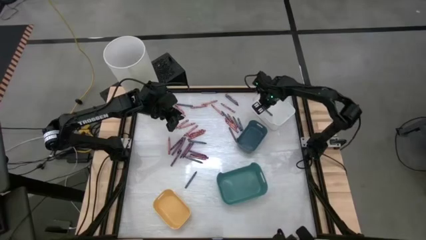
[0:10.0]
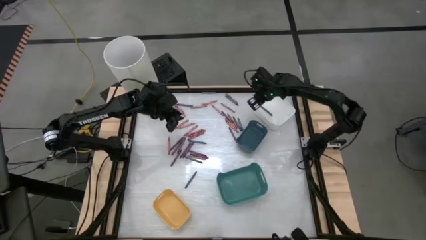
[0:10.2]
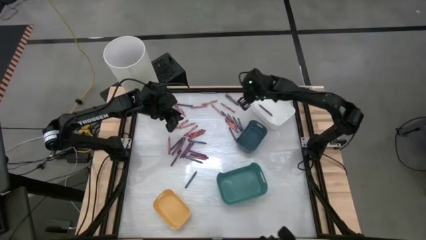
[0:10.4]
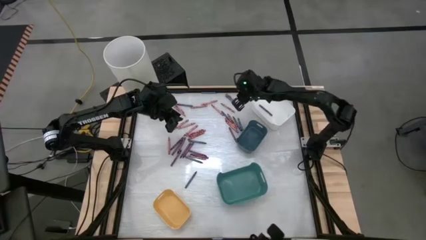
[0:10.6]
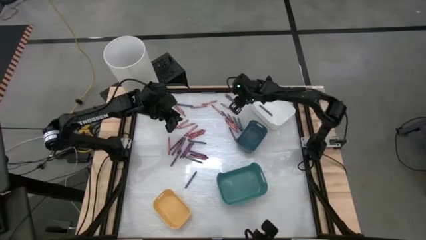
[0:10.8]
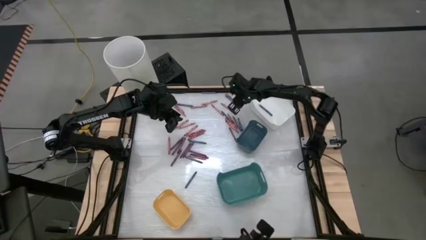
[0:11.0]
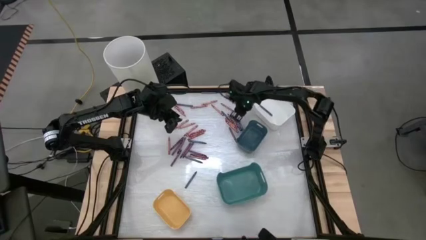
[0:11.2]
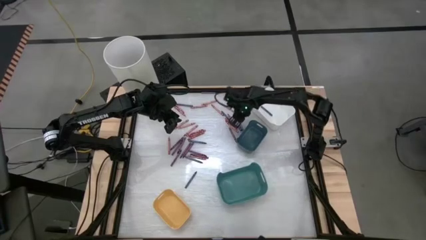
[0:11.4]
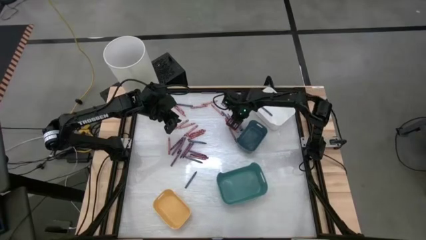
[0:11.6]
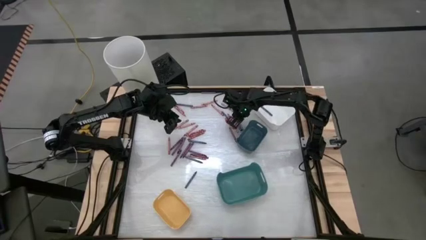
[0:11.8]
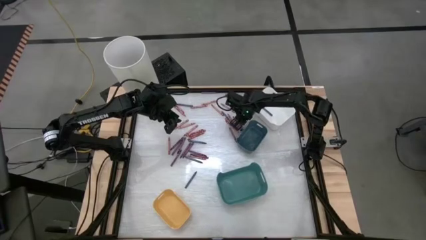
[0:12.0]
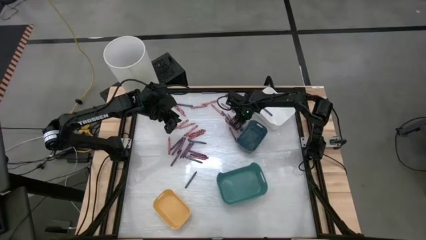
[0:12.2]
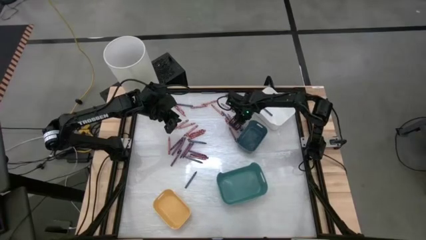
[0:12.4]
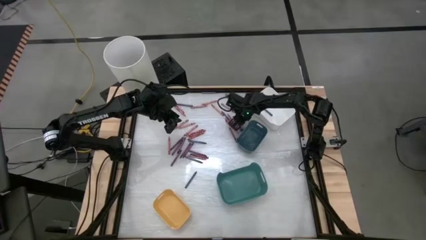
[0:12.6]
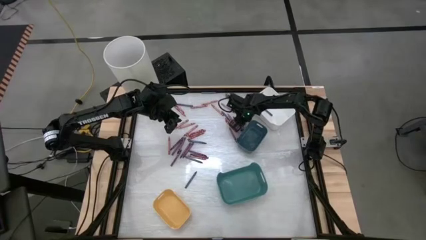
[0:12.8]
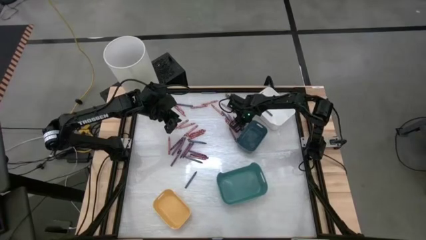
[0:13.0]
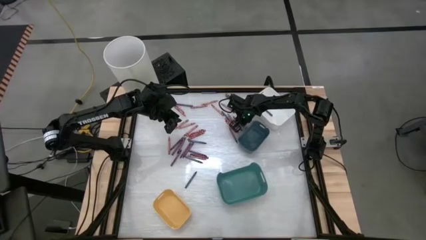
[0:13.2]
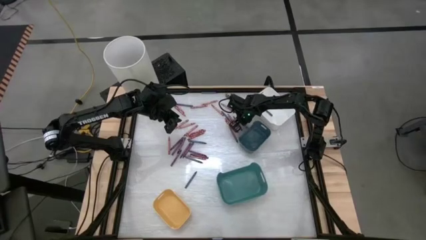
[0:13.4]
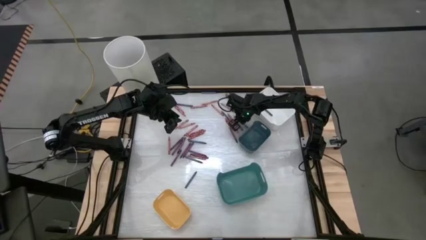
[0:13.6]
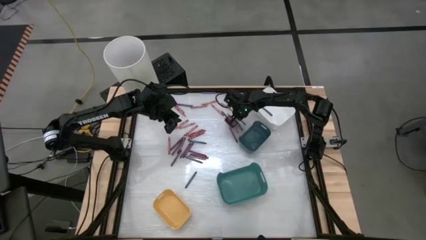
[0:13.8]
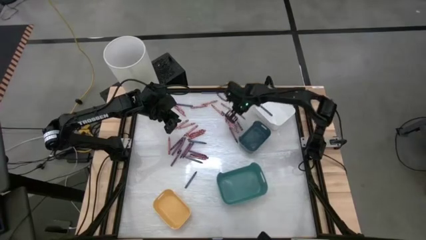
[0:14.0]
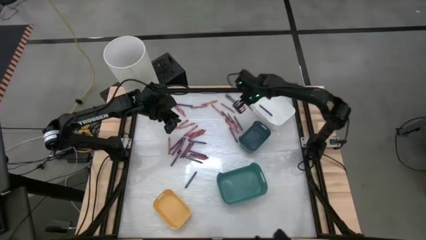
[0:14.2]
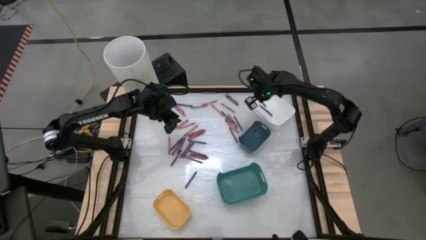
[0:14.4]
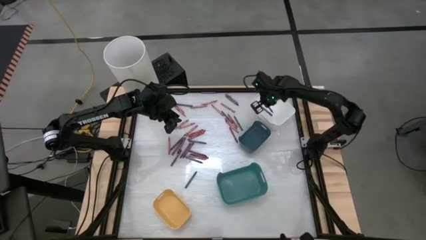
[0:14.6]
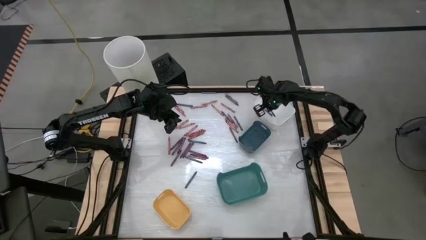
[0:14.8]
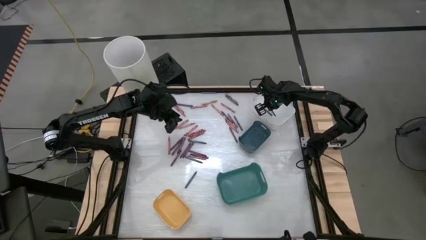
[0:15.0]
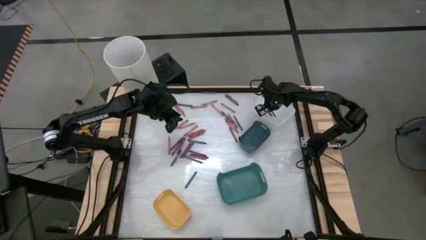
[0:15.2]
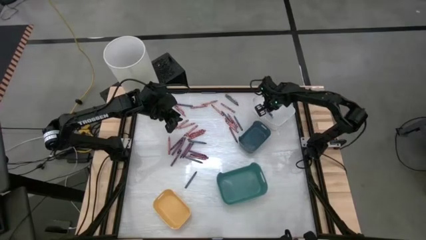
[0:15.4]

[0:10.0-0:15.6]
Task: Sort crayons
Put the blue crayon into the white bin

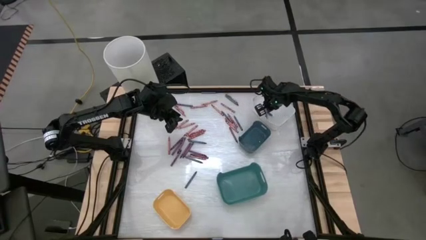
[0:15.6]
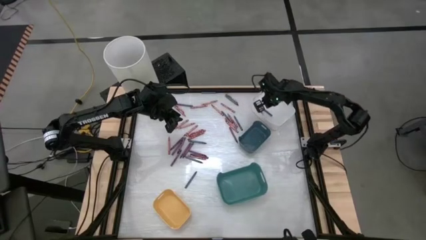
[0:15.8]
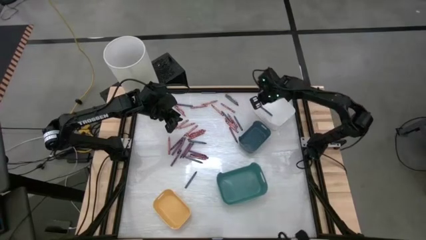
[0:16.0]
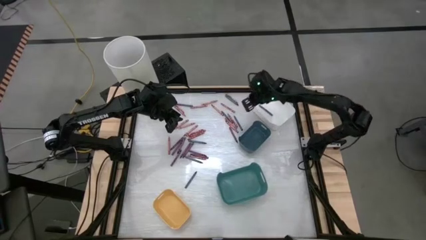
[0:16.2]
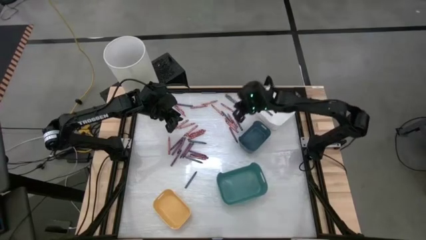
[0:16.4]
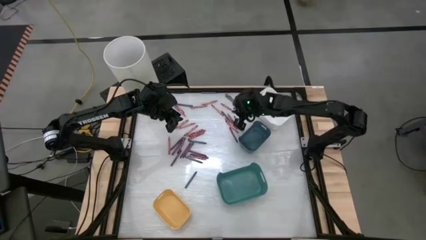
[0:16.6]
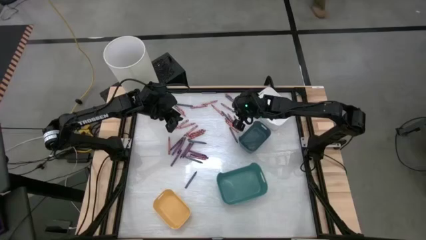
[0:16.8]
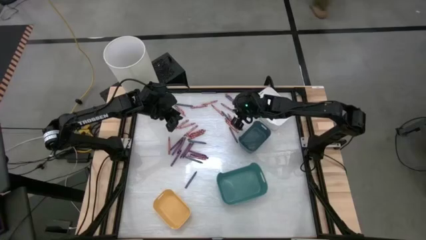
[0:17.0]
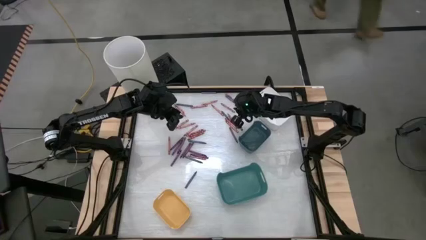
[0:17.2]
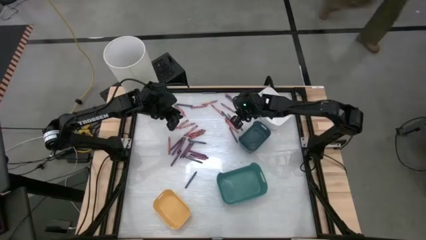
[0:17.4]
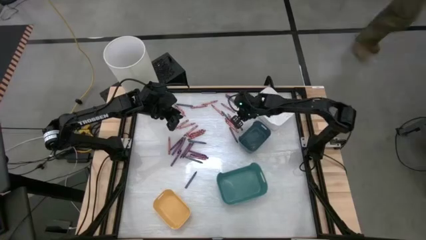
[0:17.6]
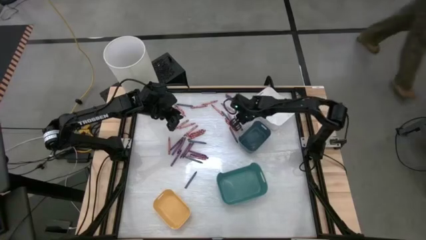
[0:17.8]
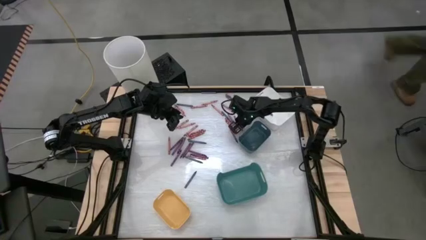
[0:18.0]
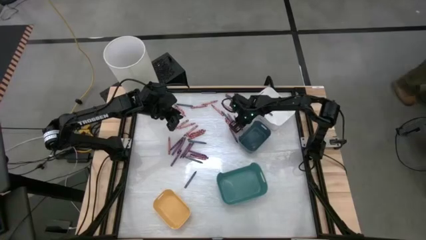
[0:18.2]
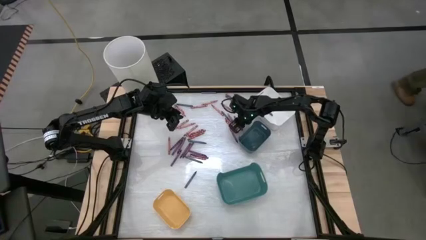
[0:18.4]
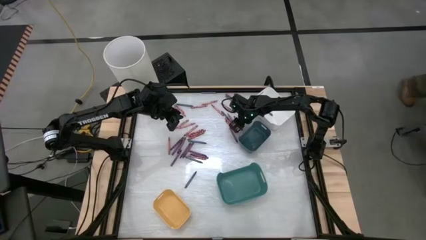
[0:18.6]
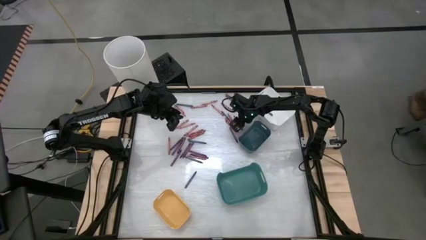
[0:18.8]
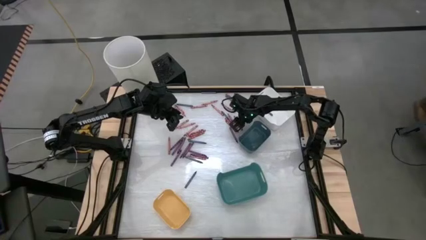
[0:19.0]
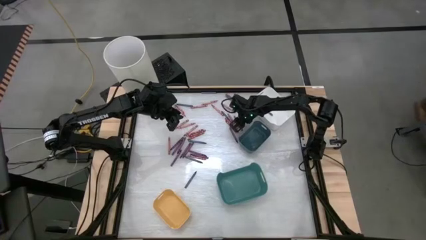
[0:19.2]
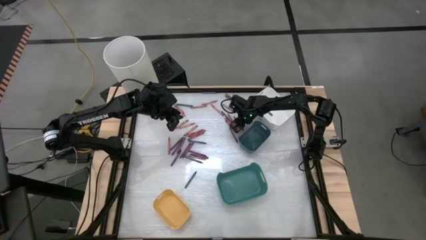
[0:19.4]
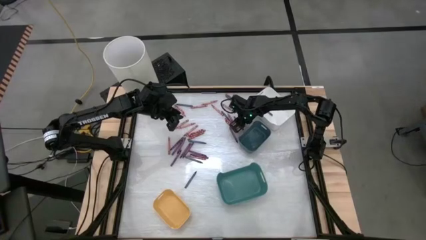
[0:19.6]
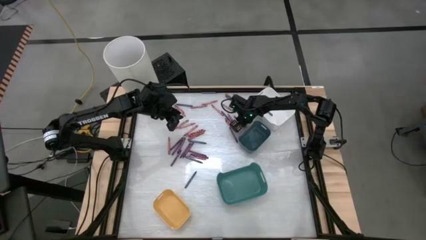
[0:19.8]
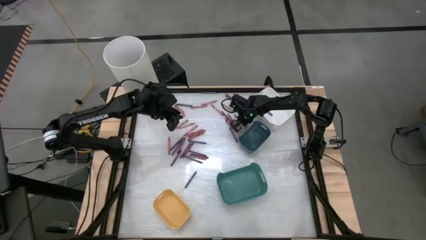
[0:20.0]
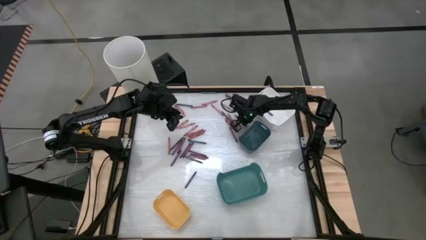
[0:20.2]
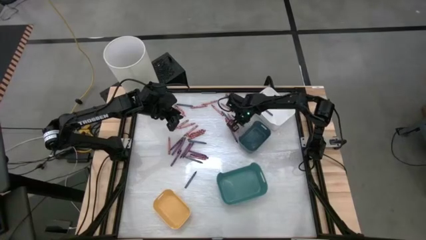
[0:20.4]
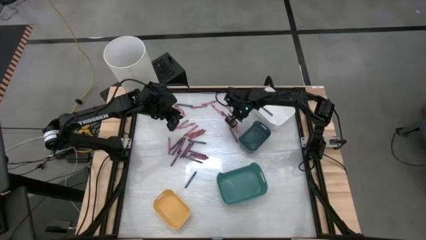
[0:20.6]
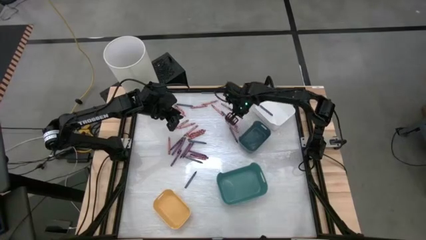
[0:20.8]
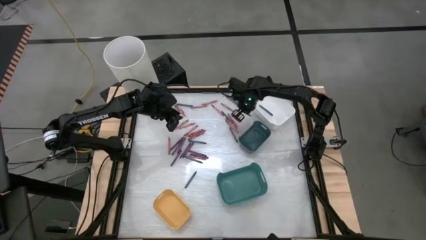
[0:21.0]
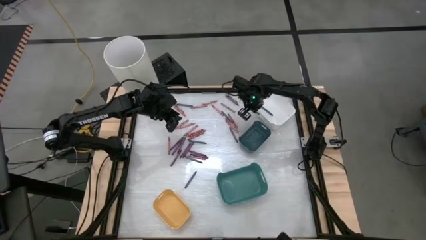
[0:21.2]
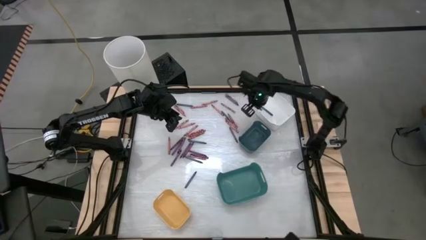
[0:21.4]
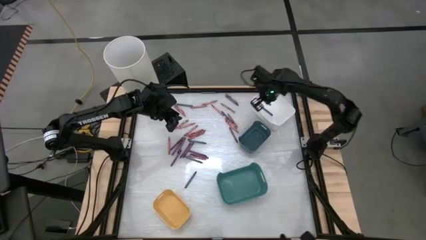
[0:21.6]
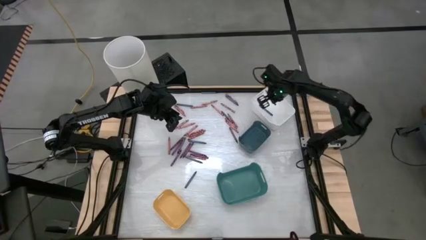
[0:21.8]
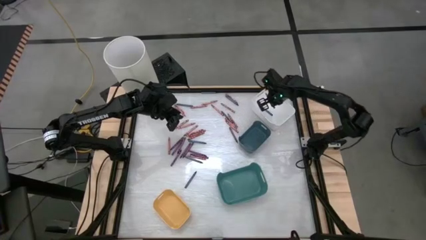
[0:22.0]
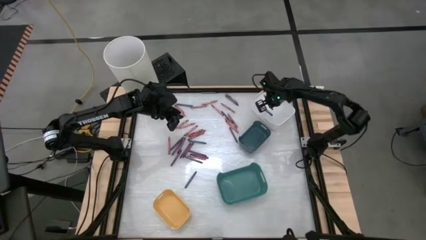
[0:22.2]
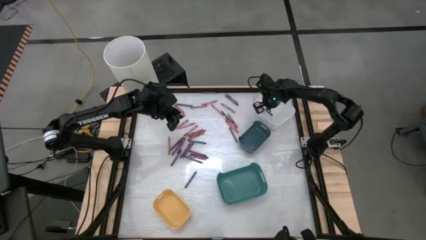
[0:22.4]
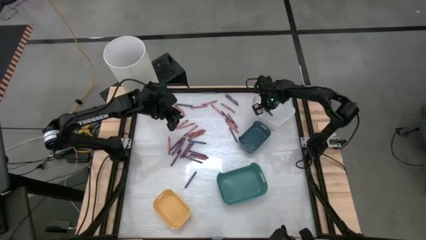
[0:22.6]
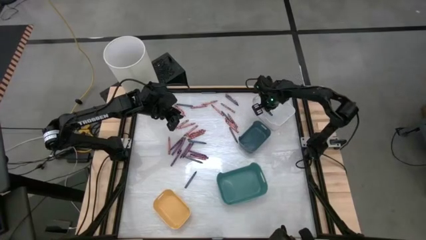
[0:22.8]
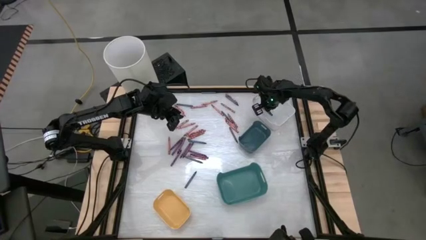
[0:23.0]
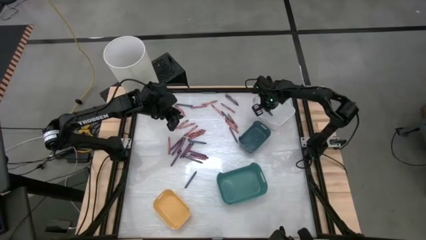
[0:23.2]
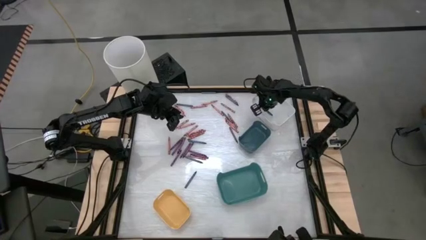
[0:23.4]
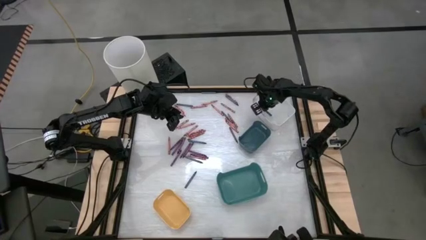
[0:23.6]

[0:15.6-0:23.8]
Put the blue crayon into the white bin

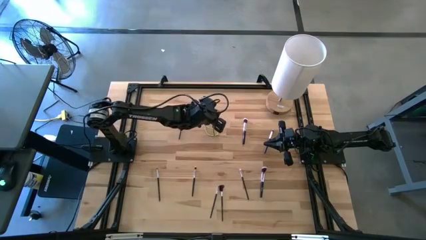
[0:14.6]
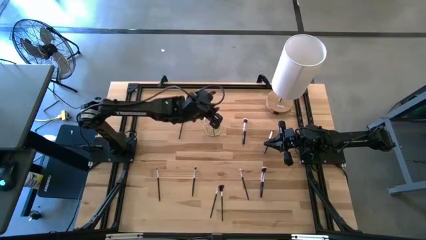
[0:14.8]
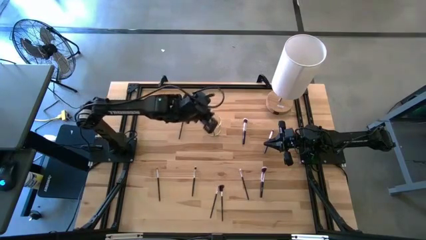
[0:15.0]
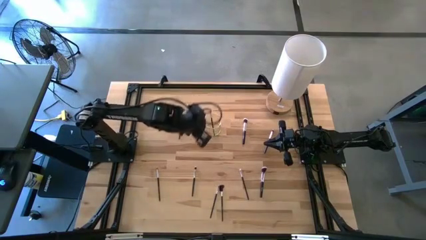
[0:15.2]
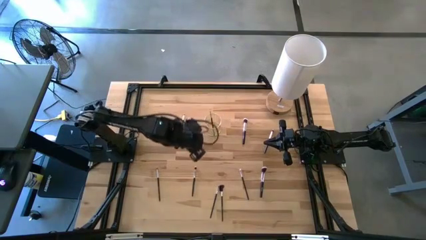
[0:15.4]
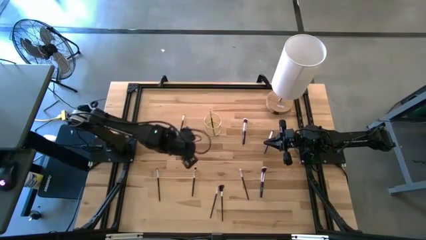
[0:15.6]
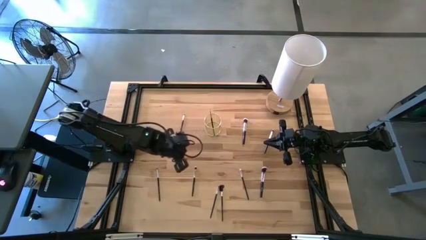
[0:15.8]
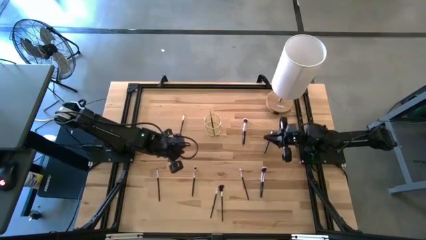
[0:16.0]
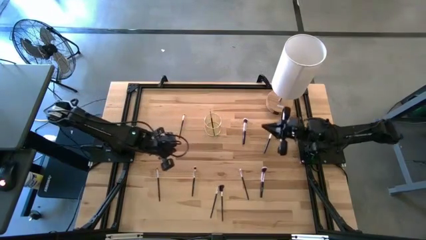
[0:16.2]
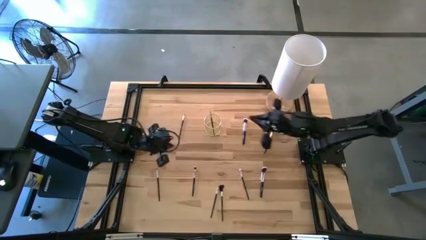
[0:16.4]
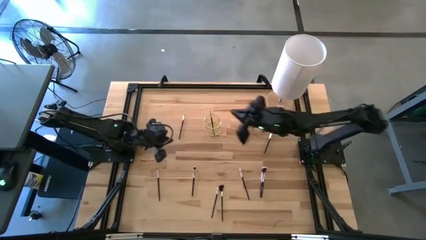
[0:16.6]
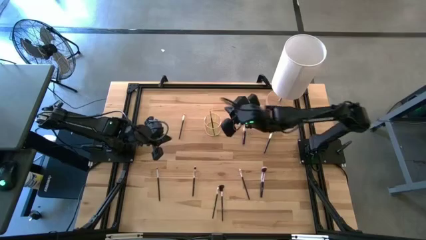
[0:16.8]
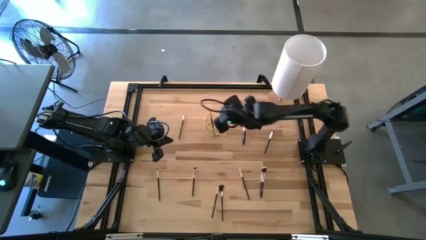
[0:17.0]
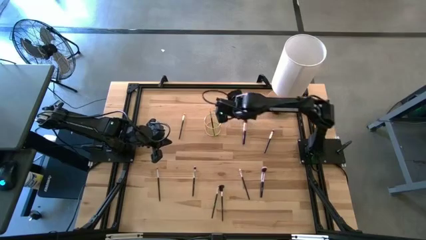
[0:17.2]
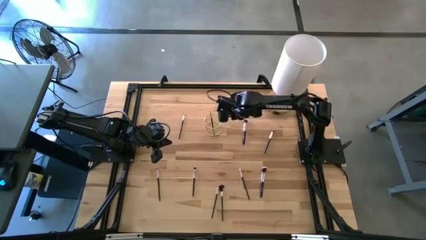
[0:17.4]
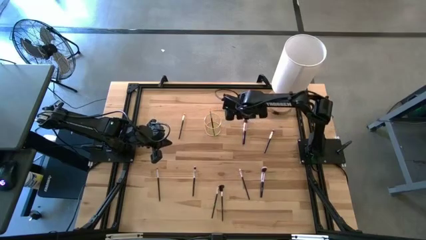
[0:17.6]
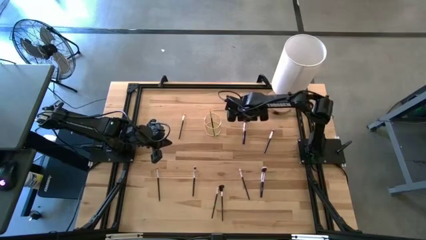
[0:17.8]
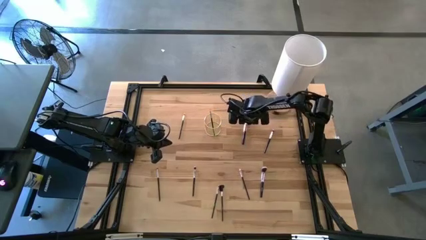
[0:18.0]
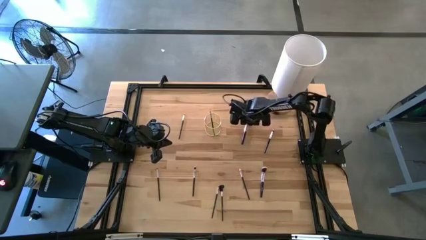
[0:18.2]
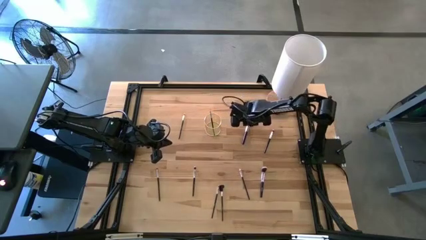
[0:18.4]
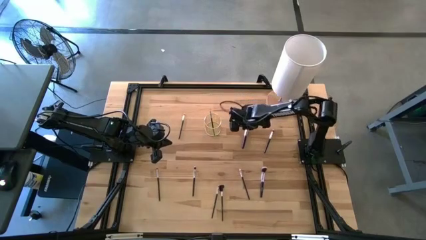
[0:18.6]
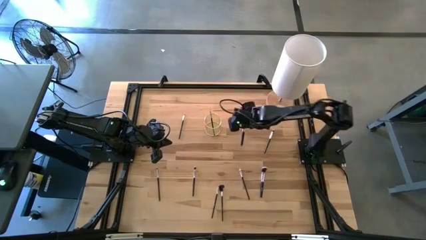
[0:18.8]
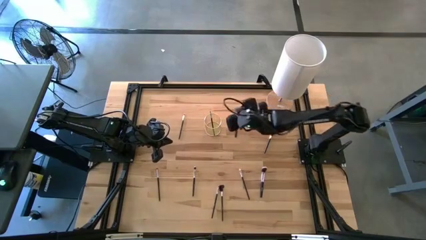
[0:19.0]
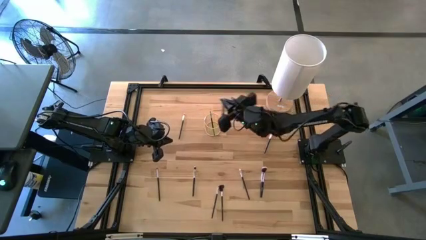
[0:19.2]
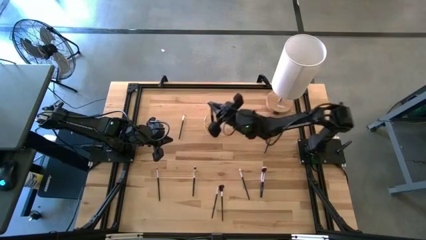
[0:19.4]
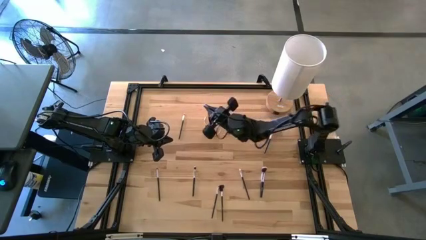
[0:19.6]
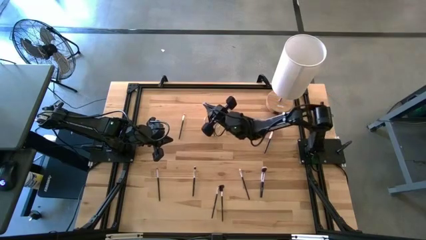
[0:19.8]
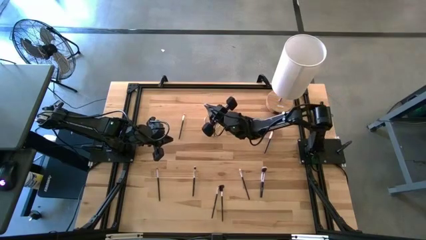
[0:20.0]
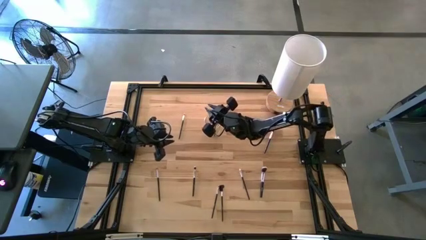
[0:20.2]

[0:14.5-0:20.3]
Task: Put items in baskets/containers
Put the black powder brush into the gold container
